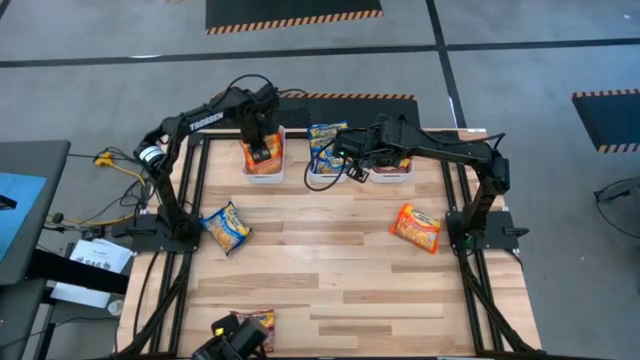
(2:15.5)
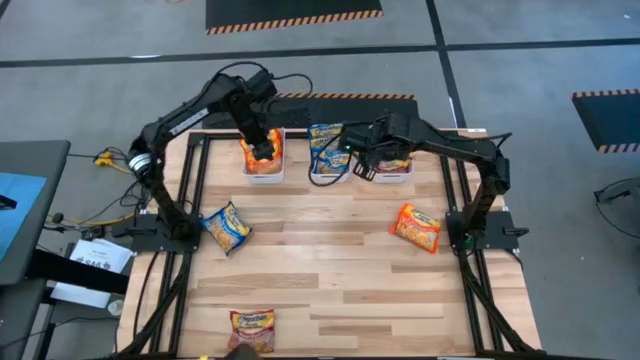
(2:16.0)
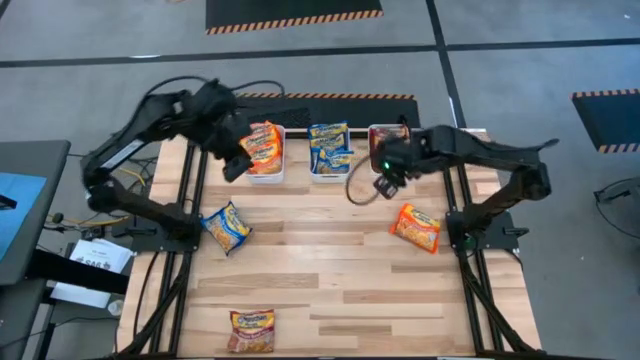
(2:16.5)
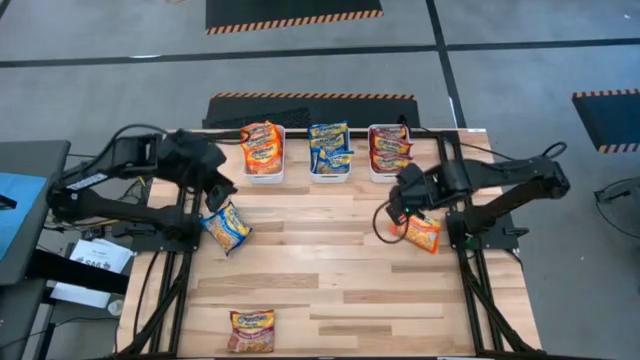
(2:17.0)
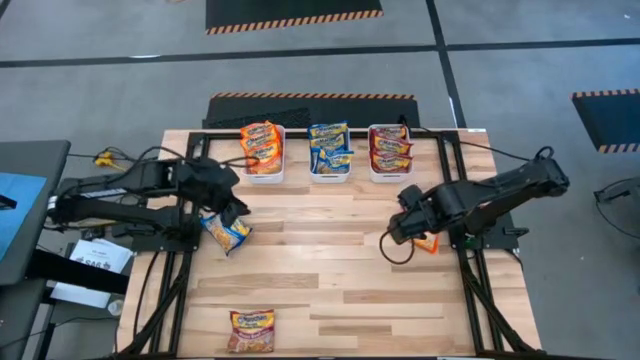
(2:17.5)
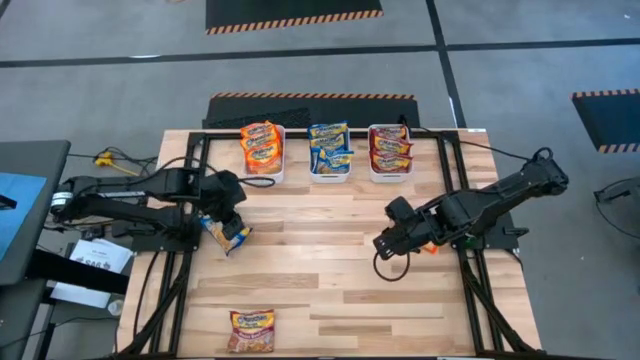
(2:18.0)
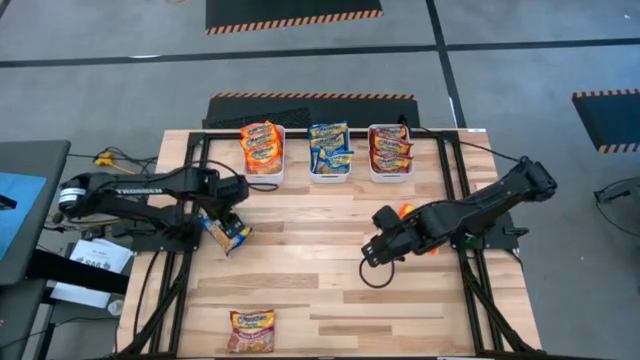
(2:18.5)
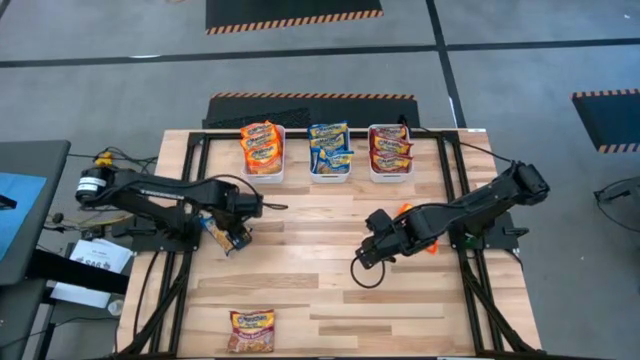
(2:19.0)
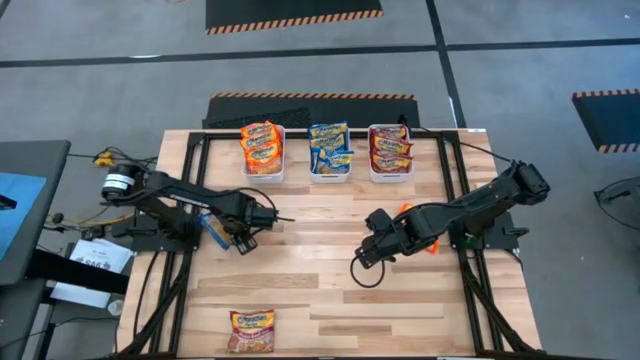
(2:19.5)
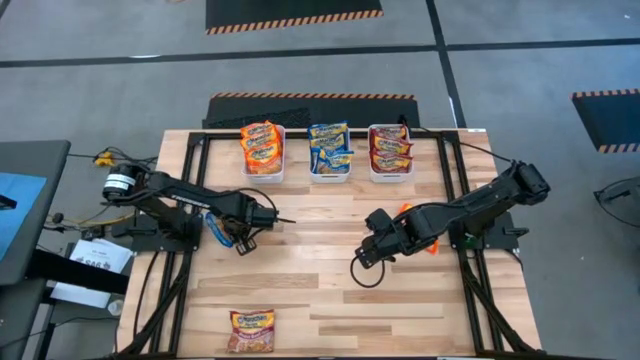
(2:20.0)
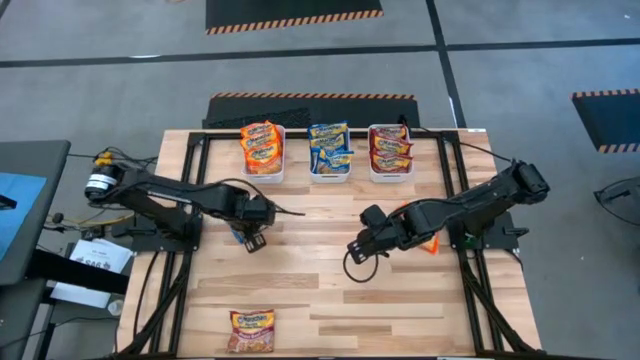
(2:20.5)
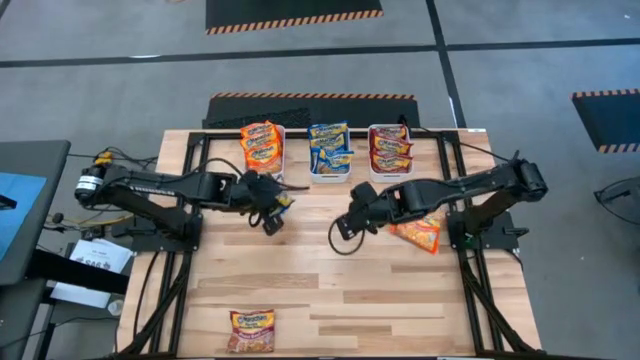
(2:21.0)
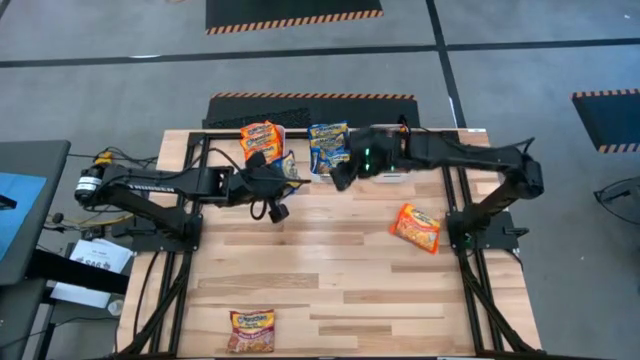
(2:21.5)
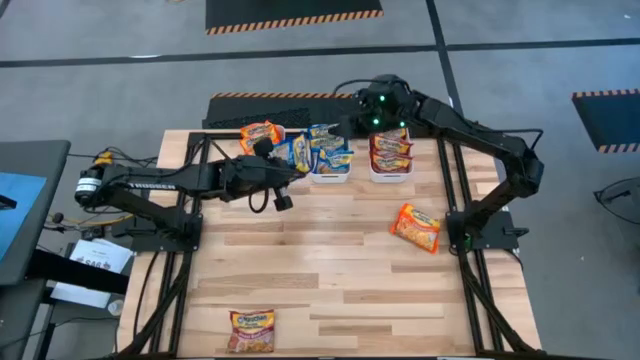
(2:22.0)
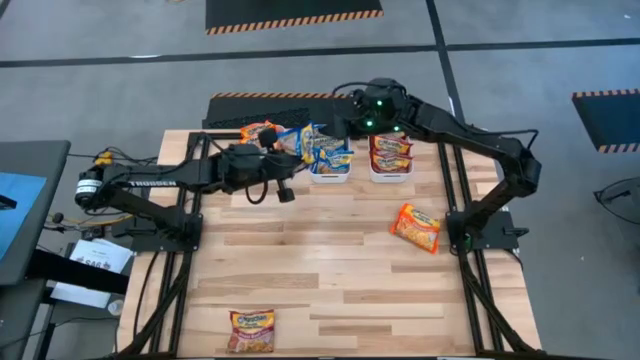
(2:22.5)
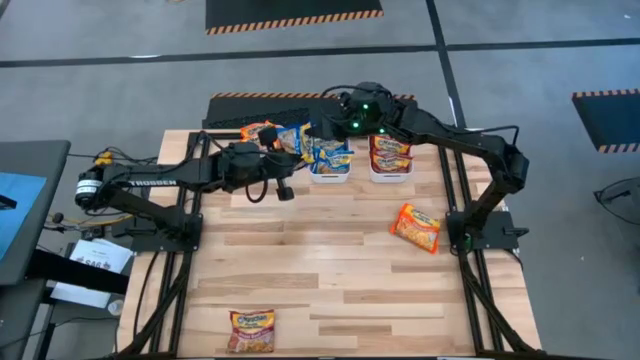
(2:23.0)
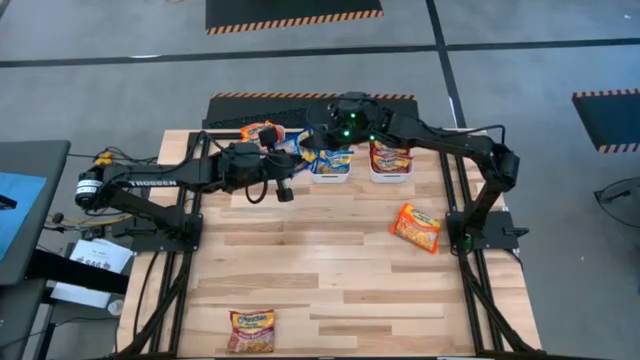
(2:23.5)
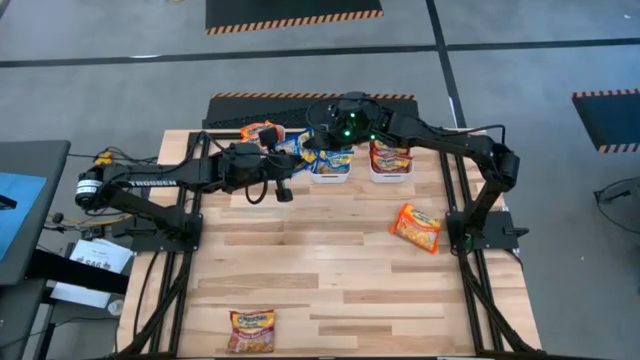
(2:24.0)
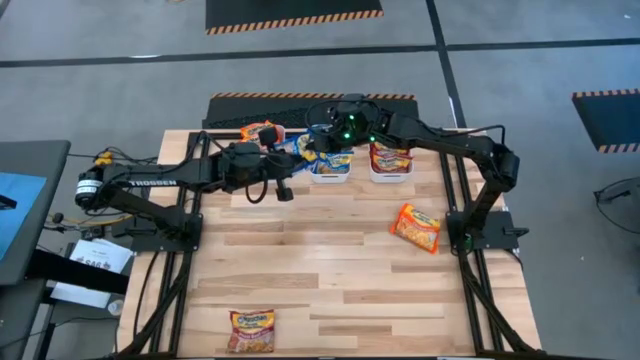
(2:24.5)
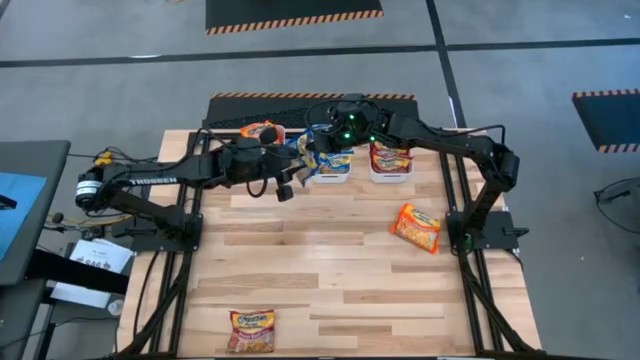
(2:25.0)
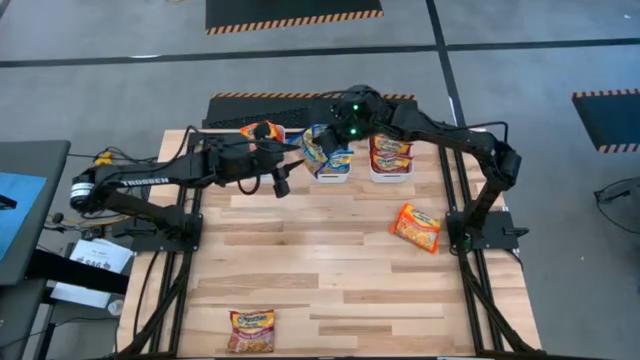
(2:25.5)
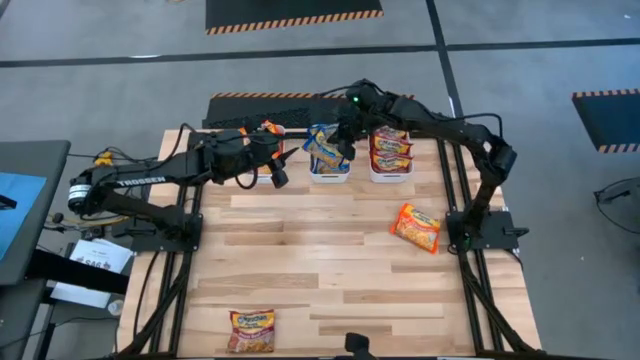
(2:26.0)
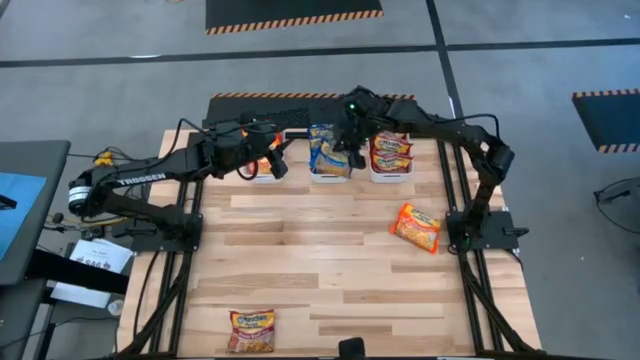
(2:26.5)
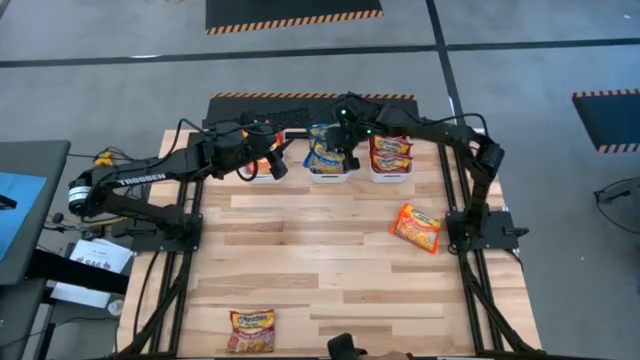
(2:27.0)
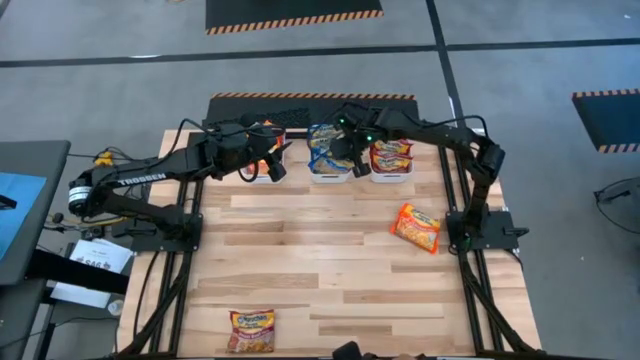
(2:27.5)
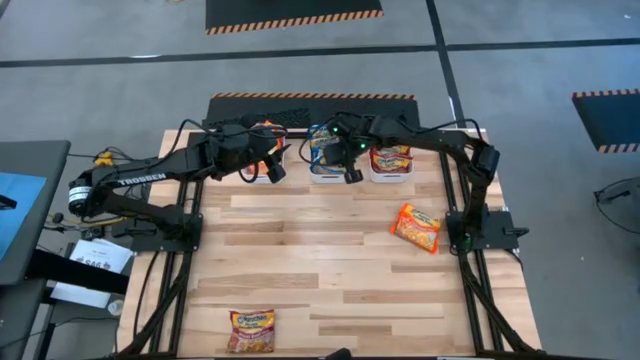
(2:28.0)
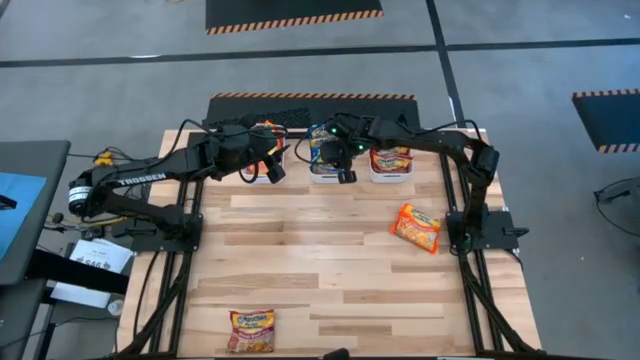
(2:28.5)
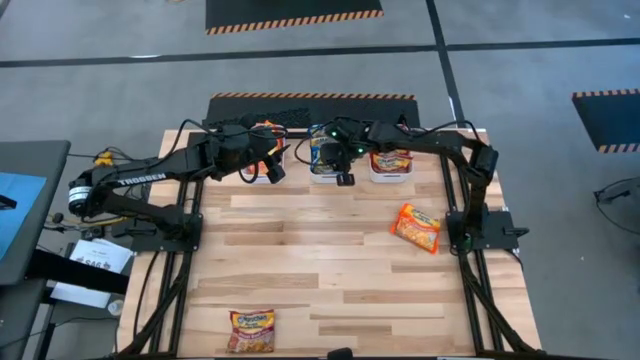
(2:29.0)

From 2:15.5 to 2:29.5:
Task: Sort Maruchan noodles
Put the blue noodle pack into the middle white bin

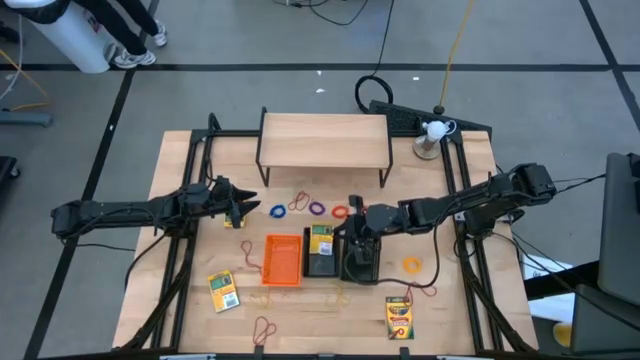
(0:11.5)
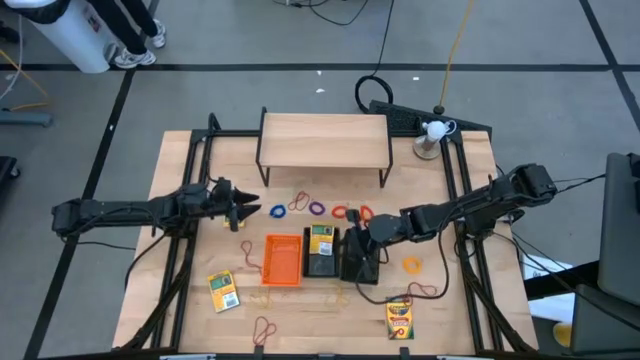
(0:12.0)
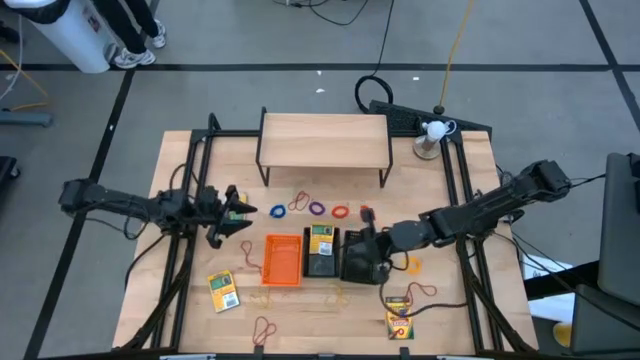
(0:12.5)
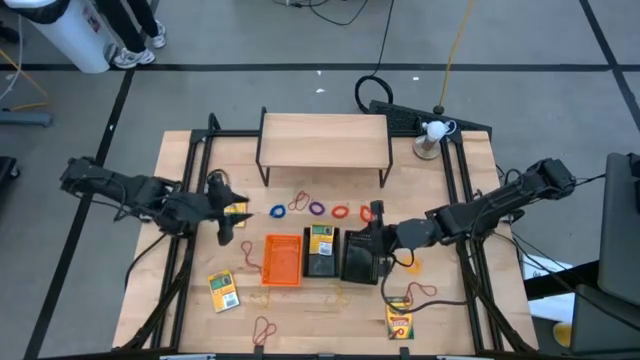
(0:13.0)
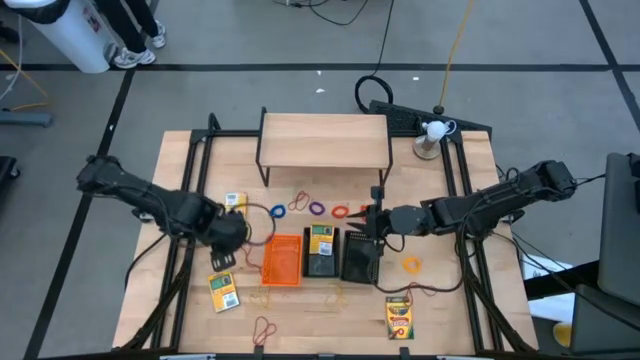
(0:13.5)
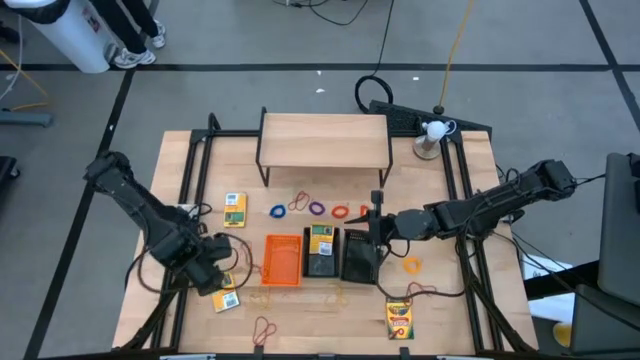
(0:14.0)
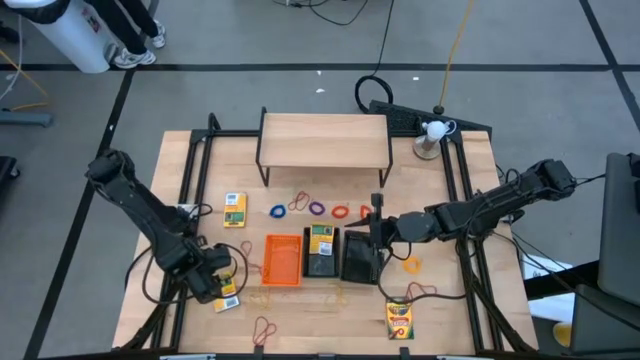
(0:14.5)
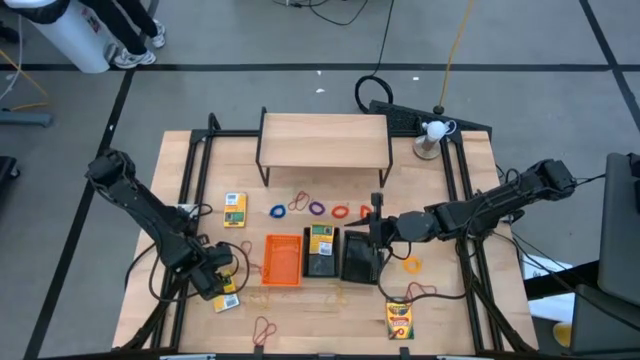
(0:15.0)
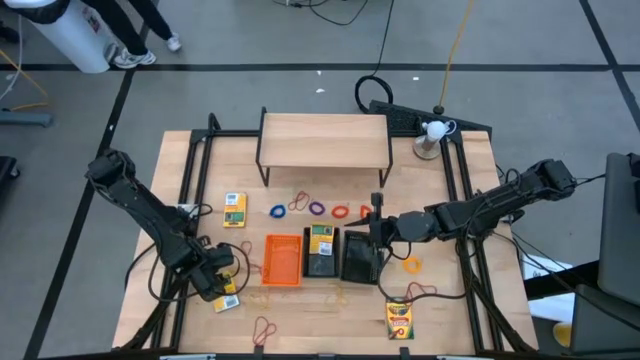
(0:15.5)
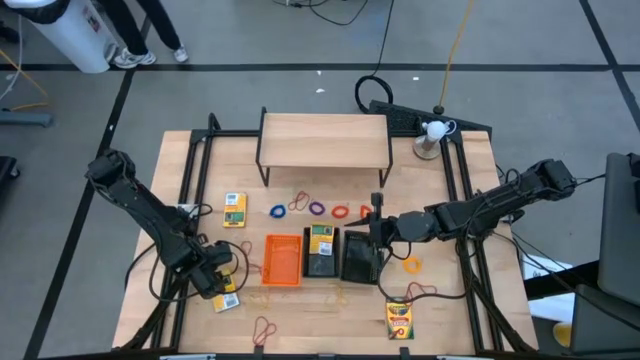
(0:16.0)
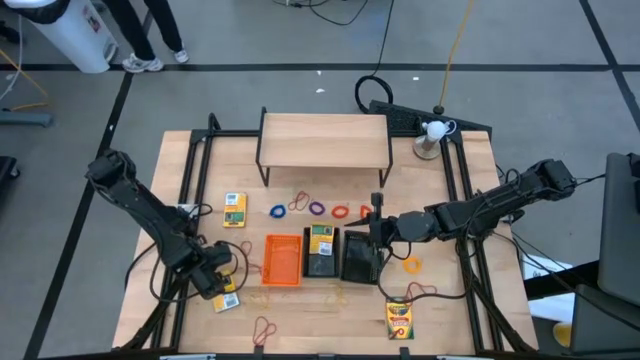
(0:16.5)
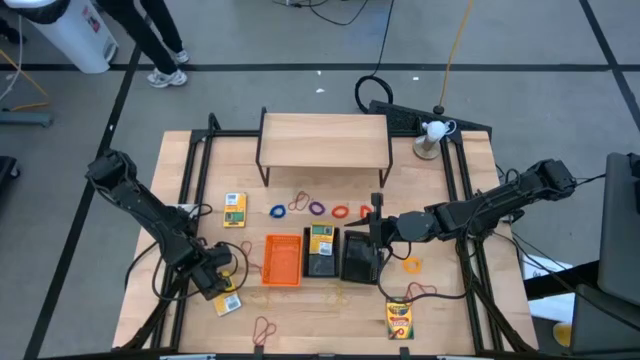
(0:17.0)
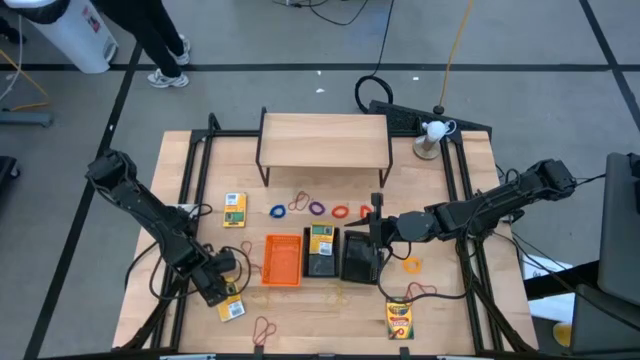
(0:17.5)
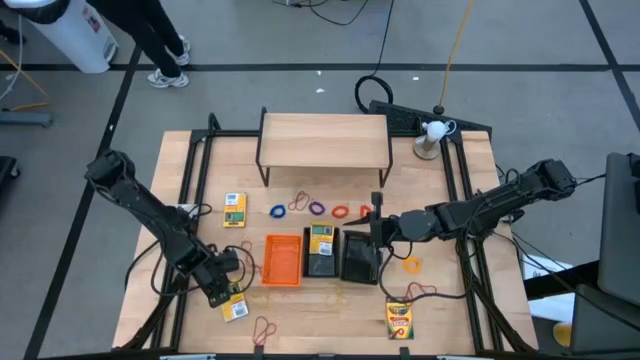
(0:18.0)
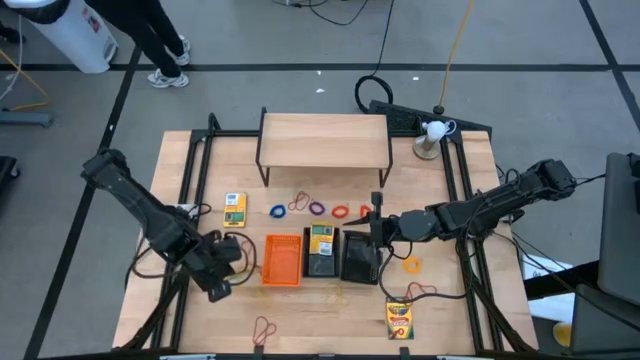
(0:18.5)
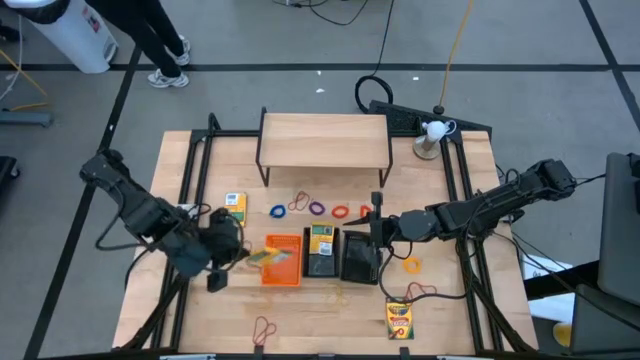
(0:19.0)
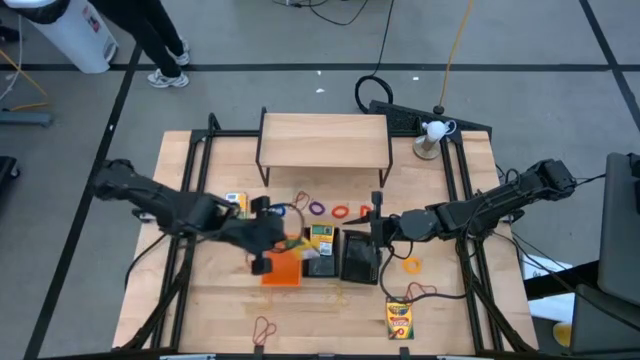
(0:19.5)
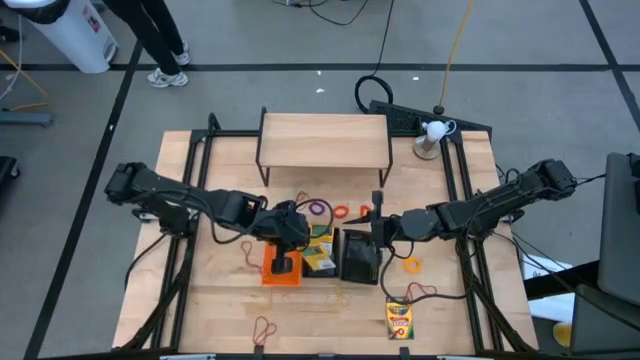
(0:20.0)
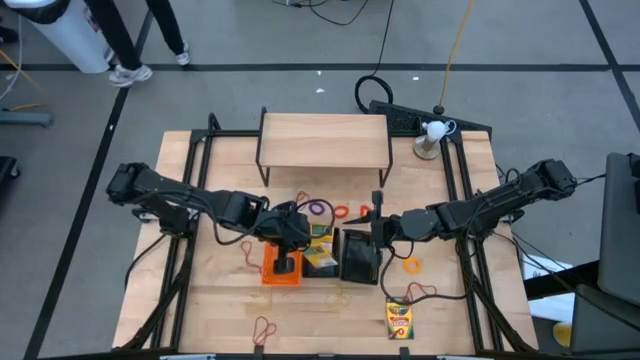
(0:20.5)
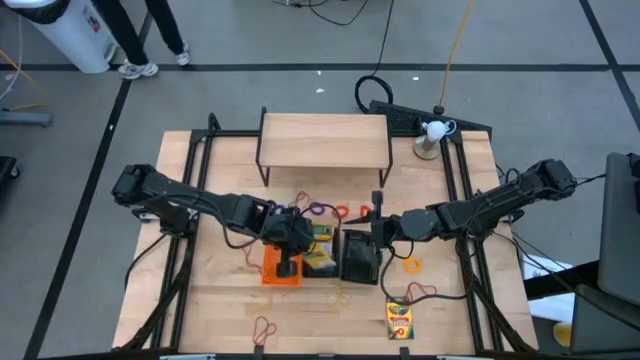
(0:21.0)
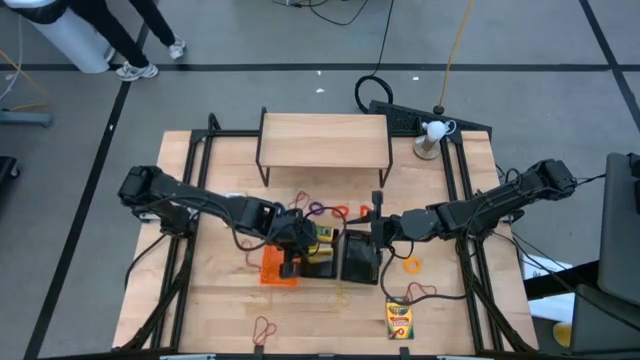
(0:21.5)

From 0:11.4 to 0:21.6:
Task: Pick & Place Office Desk Supplies
Put the crayon box into the left black bin
